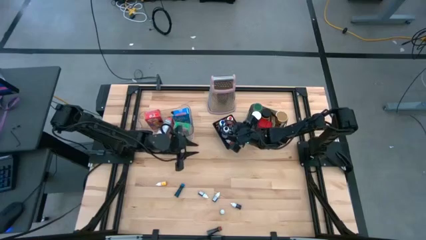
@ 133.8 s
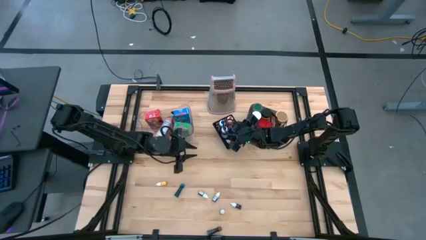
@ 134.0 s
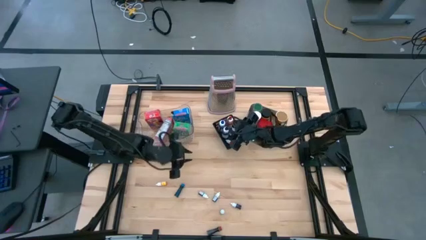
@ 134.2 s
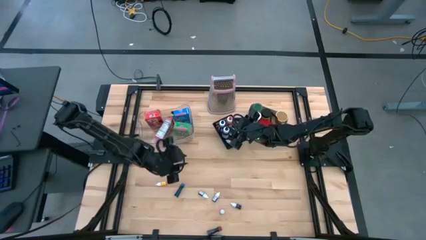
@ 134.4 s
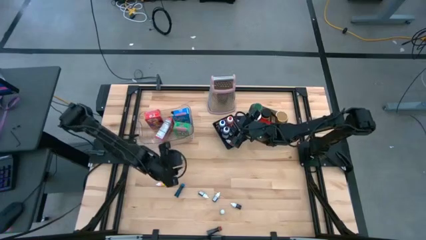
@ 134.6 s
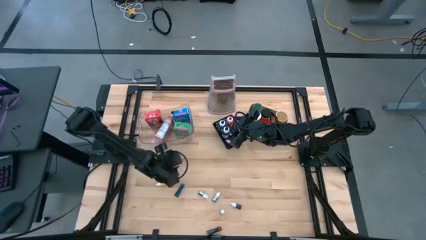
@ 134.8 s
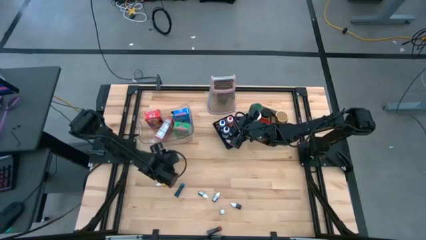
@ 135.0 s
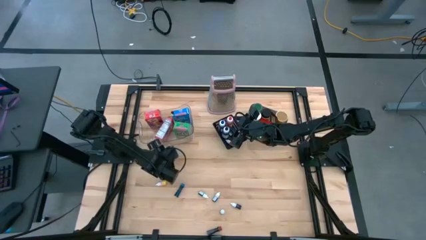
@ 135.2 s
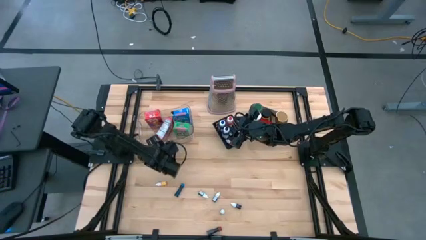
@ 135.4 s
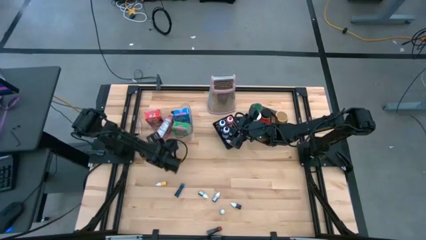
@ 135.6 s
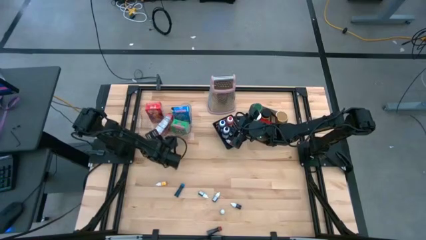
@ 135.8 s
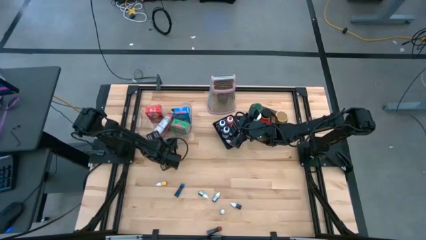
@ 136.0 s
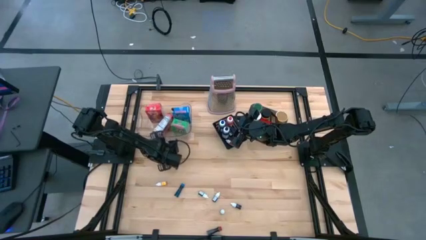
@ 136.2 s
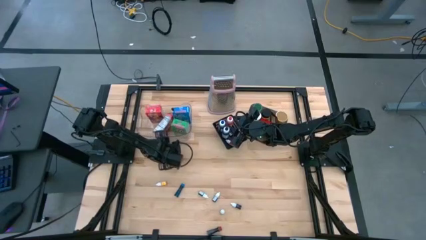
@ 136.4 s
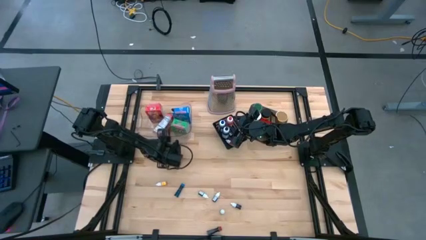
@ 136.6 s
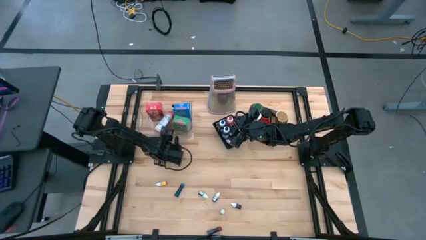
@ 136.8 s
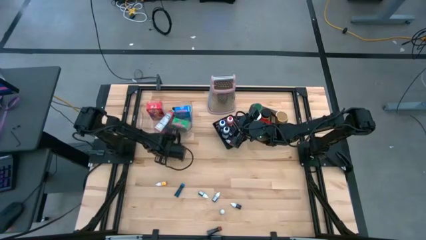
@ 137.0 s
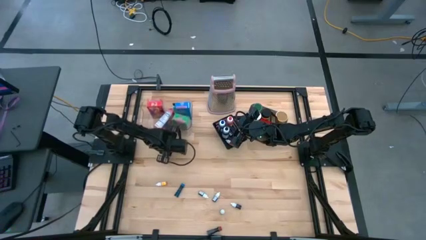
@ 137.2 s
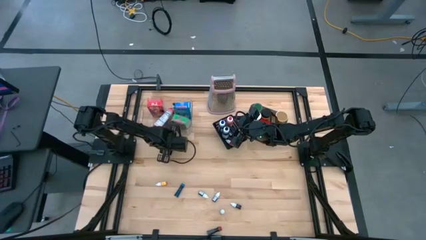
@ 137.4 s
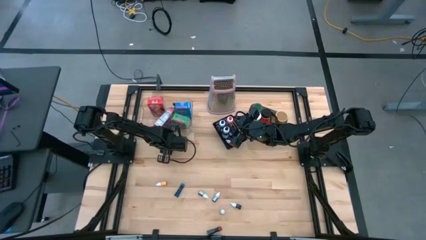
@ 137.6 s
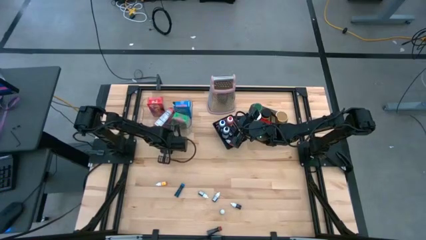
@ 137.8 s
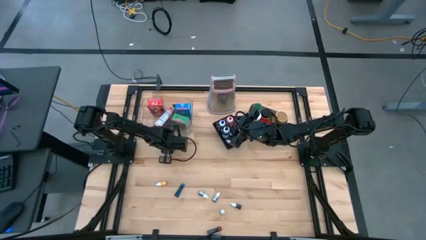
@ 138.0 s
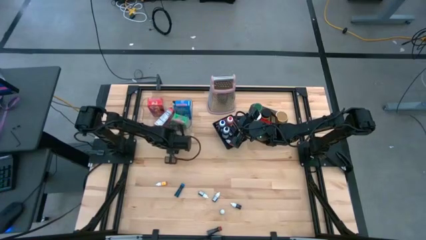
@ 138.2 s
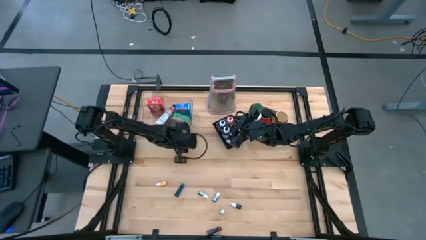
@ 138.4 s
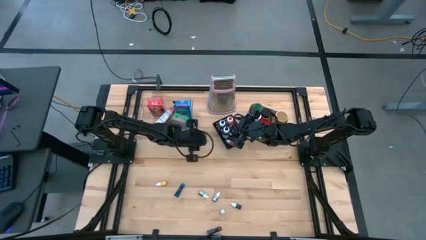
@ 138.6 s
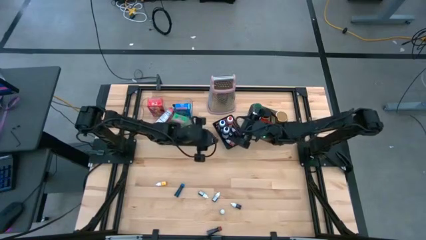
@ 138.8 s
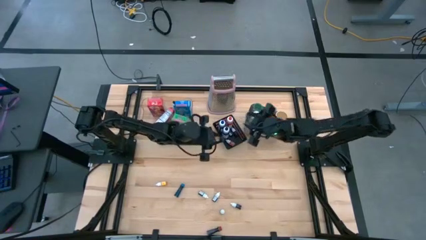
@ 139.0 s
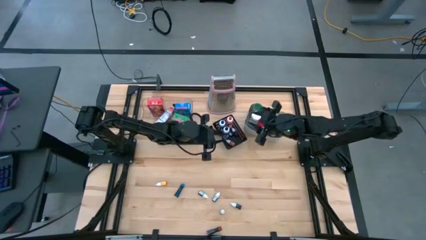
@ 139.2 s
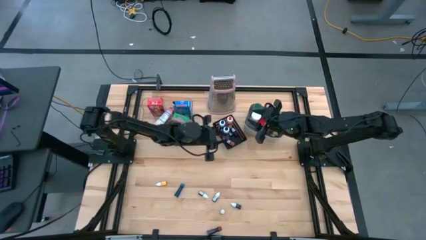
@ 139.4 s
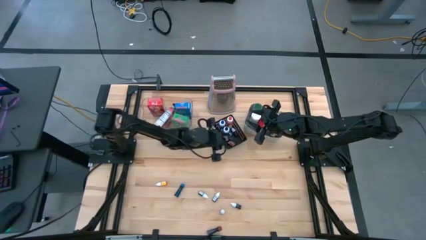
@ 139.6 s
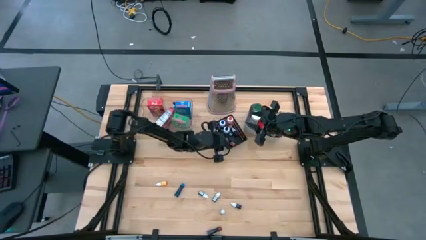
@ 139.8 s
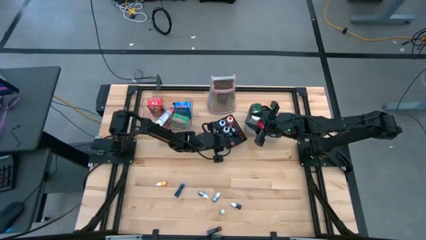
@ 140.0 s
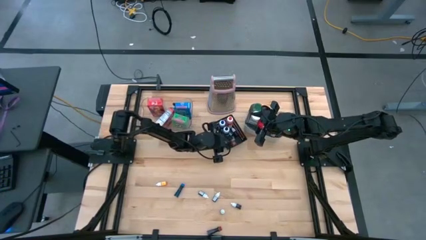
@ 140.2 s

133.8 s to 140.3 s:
Task: Pick & Place Kitchen Items
Put the violet food coloring bottle into the black bin

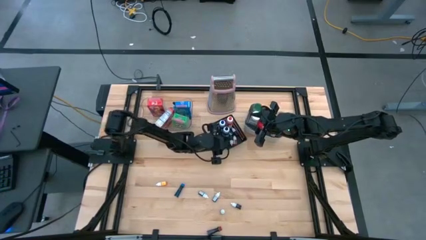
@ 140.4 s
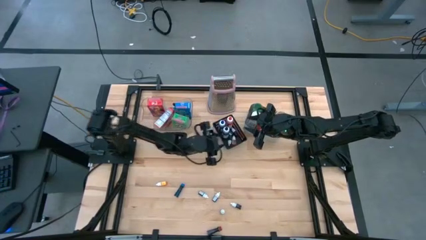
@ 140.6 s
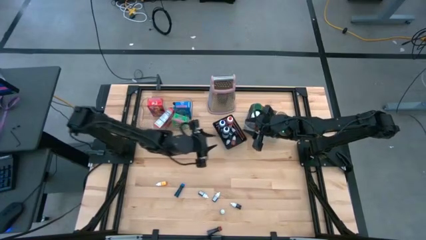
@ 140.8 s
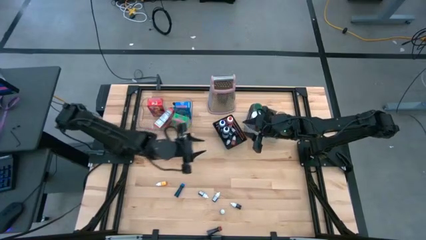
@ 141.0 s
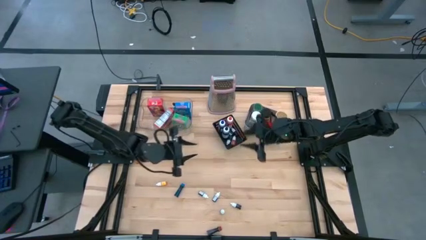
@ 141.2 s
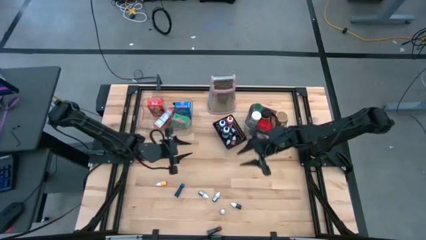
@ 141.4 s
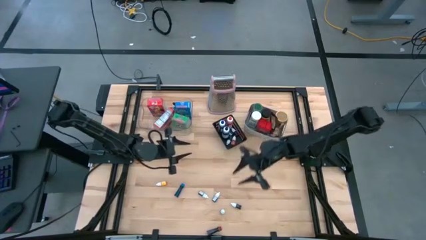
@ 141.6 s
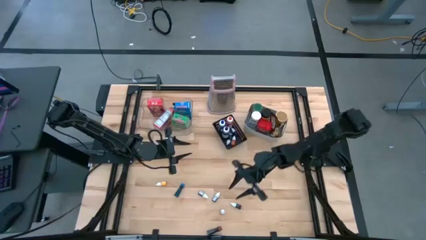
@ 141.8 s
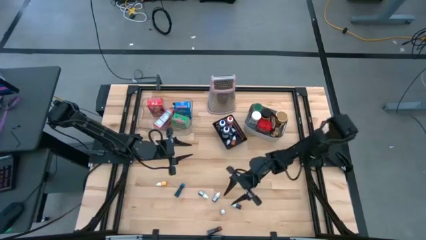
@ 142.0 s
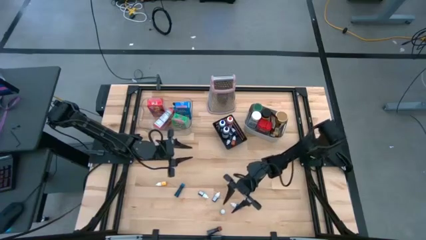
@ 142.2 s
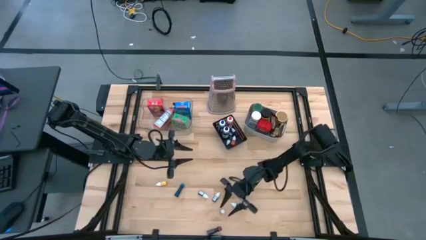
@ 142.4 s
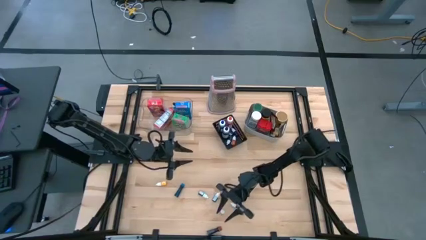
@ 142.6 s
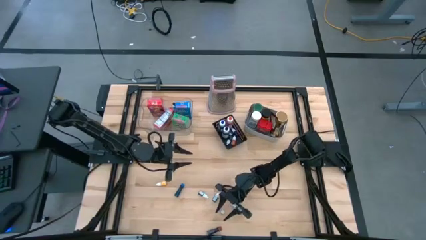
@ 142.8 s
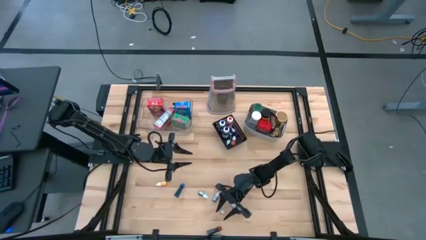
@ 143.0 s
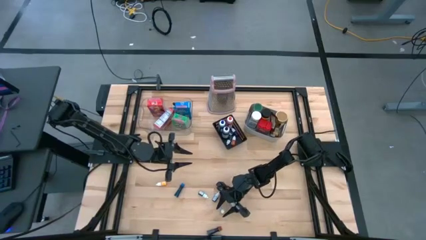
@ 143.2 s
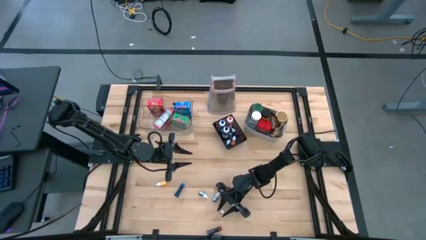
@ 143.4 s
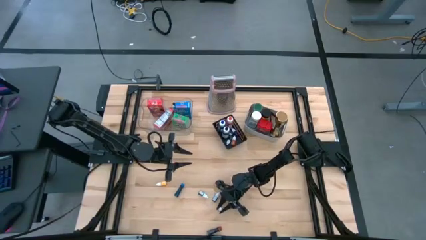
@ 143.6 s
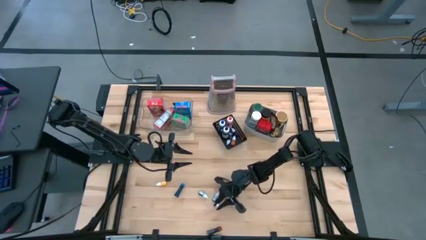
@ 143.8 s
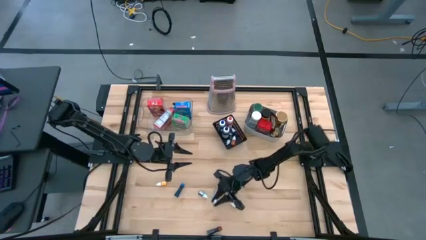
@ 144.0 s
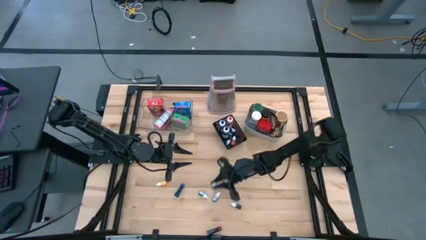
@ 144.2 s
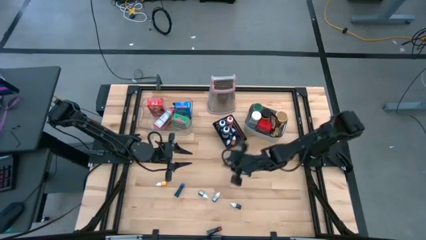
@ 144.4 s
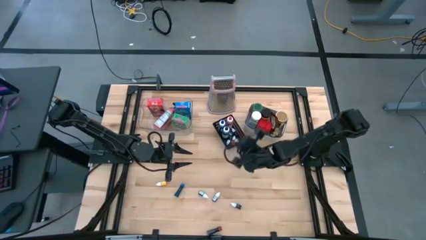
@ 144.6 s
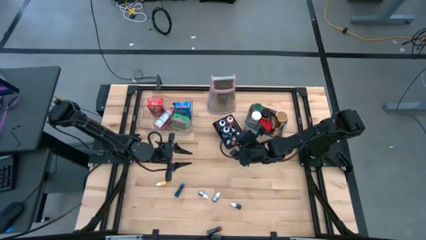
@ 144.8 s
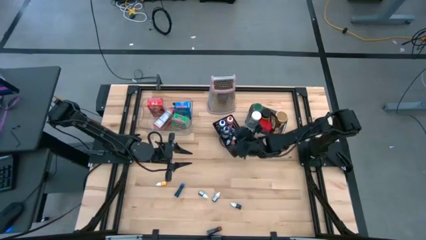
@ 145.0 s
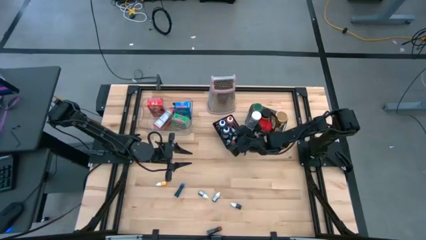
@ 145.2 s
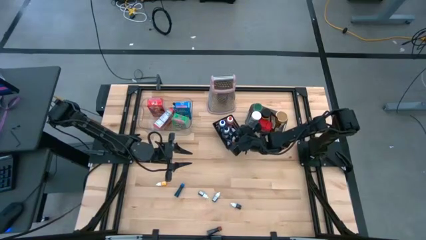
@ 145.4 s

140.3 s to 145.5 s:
Put the violet food coloring bottle into the black bin

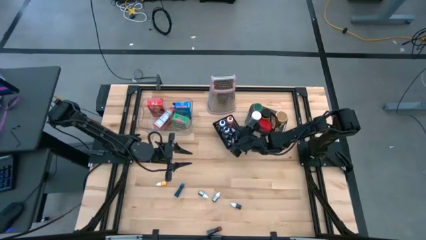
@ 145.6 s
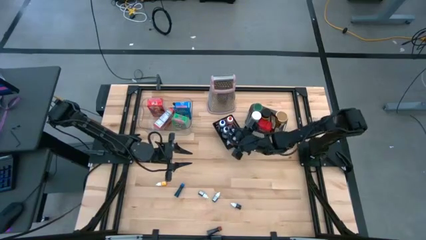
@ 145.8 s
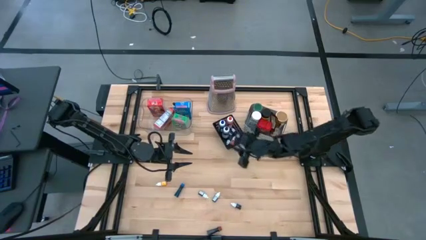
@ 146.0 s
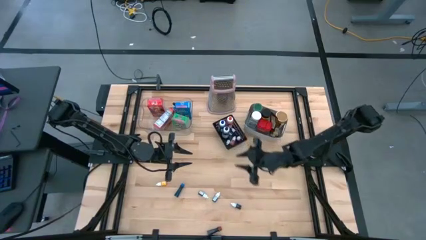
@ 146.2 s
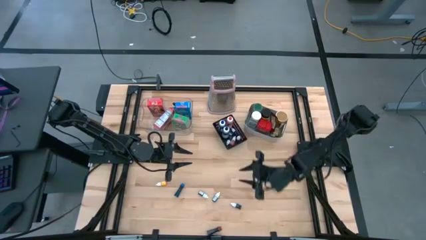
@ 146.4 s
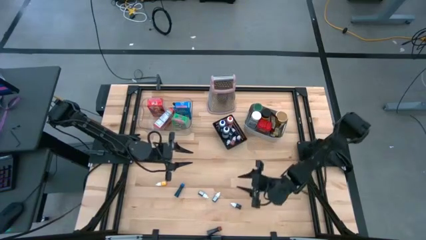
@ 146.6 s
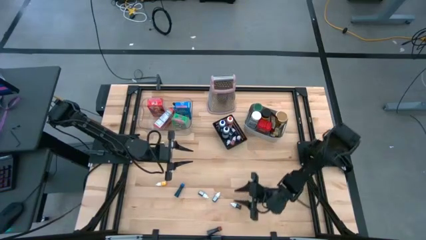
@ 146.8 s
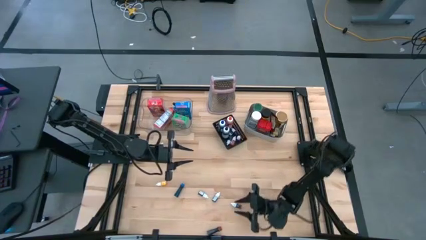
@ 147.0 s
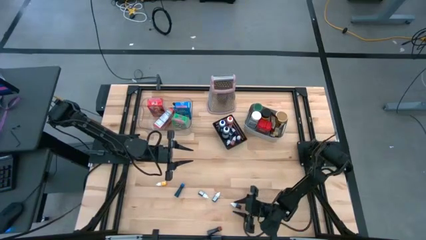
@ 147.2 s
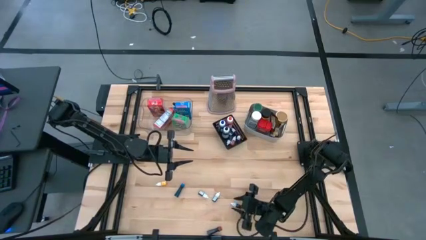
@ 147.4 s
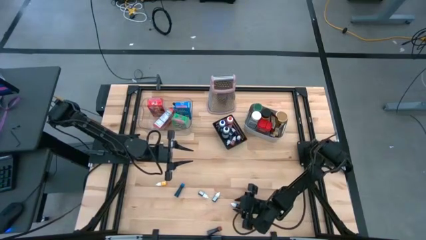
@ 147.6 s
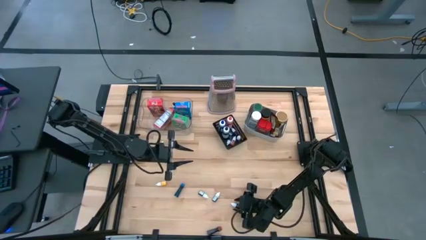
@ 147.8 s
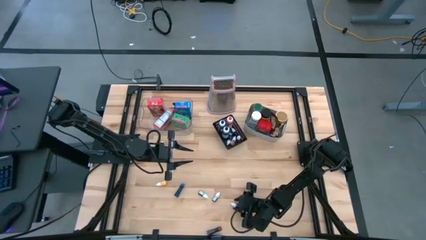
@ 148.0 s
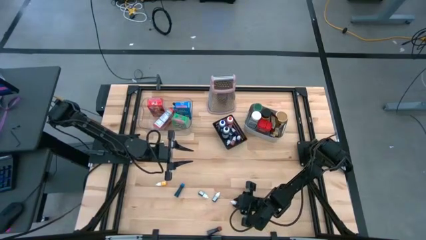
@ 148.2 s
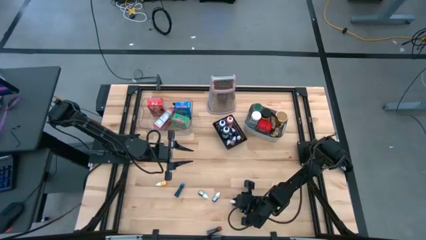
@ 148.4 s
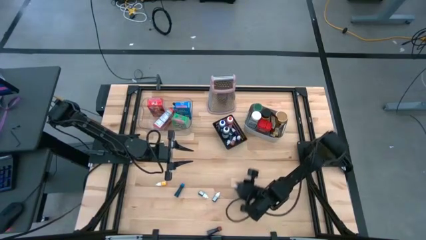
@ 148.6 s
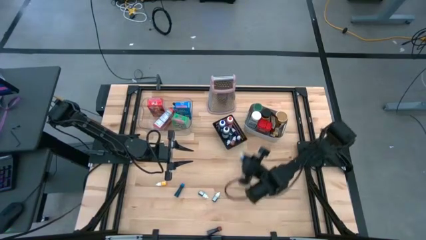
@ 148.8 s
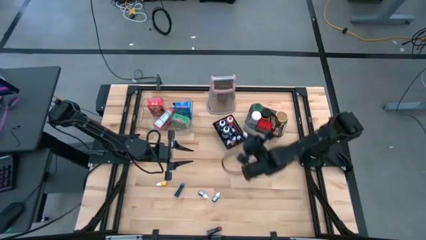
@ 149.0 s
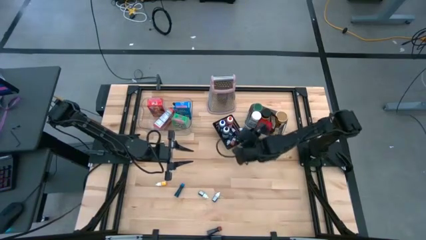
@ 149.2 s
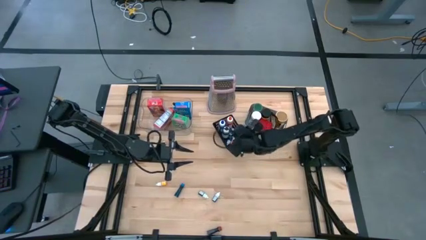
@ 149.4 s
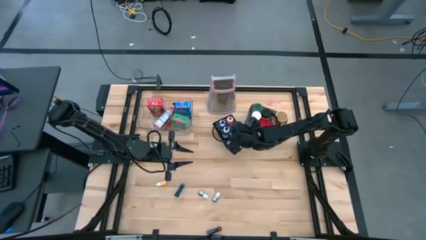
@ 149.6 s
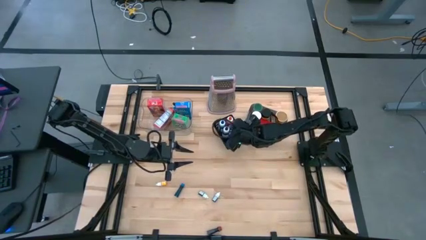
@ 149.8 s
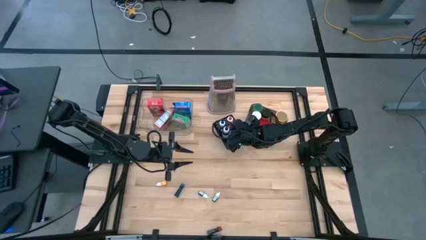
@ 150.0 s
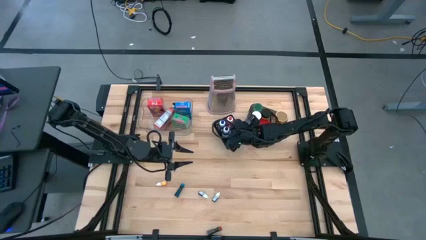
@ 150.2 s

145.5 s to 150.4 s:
Put the violet food coloring bottle into the black bin
